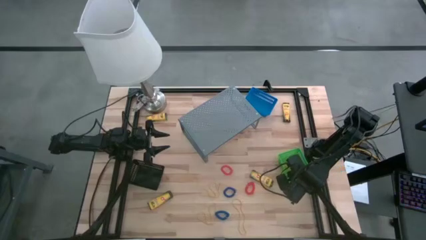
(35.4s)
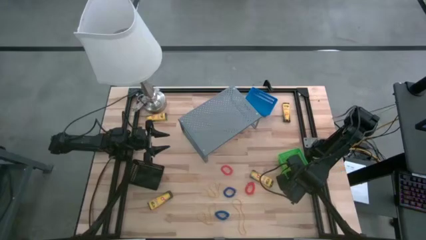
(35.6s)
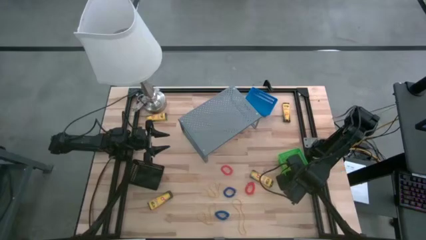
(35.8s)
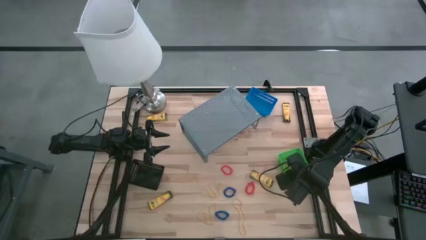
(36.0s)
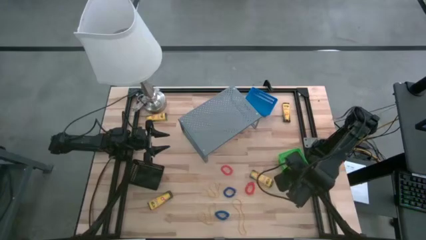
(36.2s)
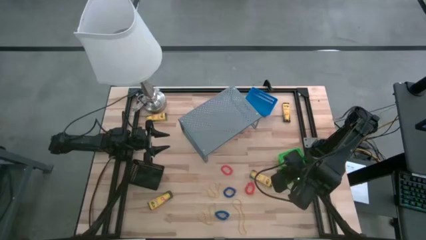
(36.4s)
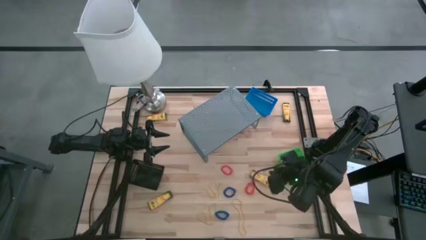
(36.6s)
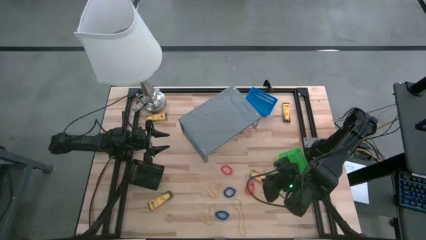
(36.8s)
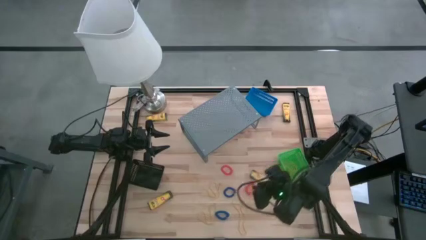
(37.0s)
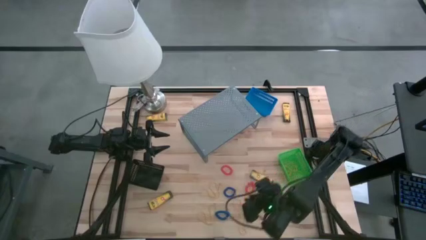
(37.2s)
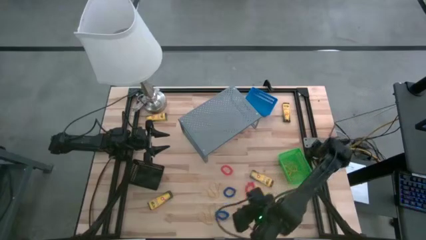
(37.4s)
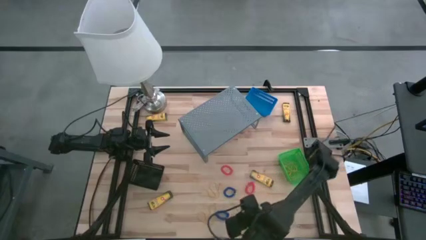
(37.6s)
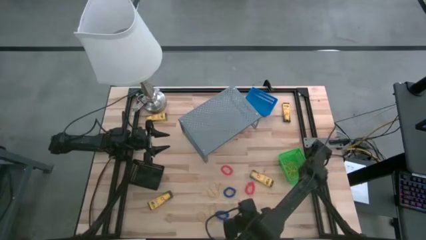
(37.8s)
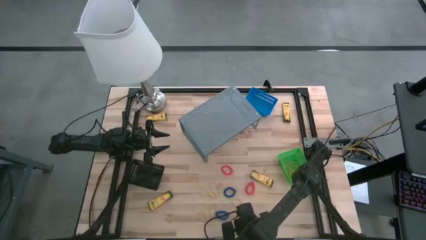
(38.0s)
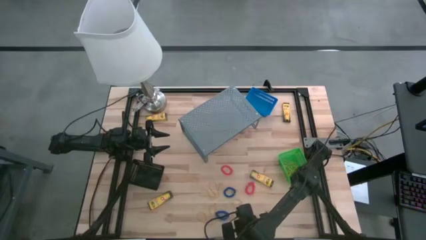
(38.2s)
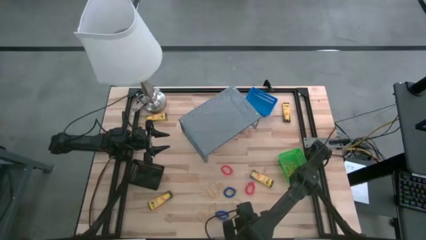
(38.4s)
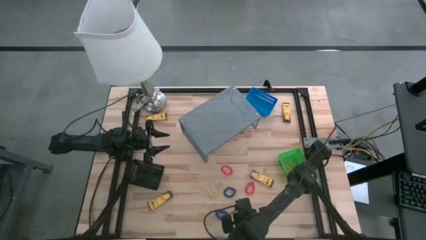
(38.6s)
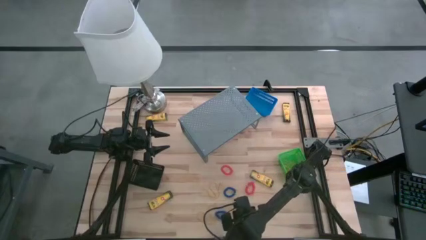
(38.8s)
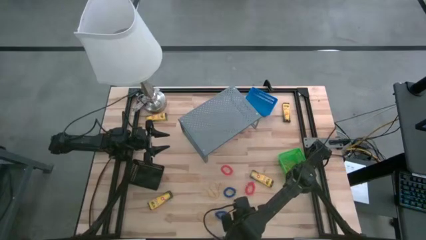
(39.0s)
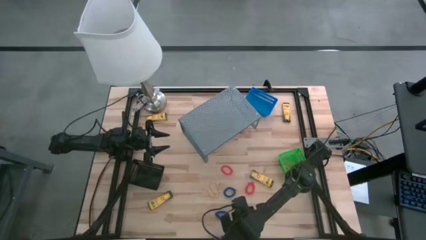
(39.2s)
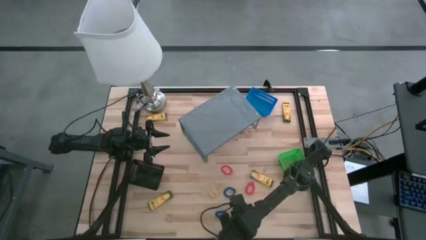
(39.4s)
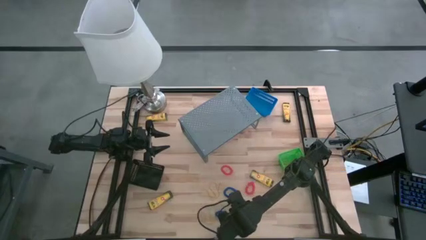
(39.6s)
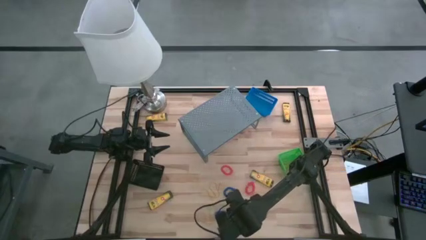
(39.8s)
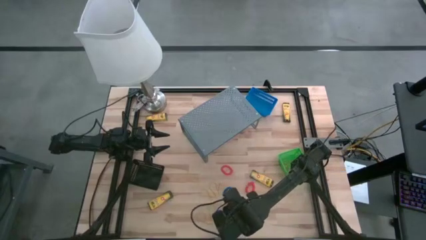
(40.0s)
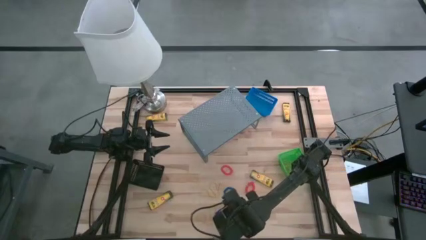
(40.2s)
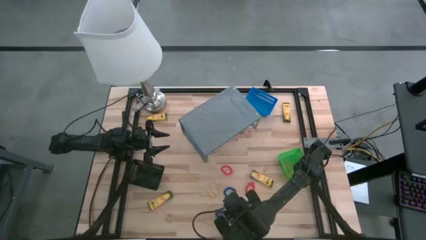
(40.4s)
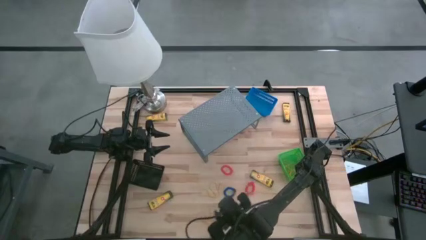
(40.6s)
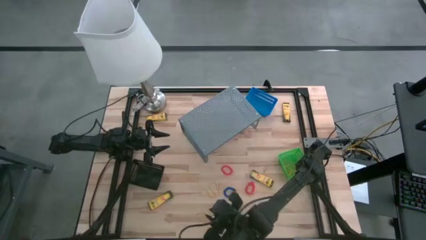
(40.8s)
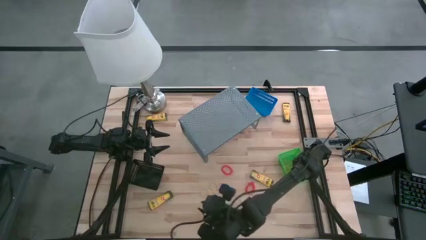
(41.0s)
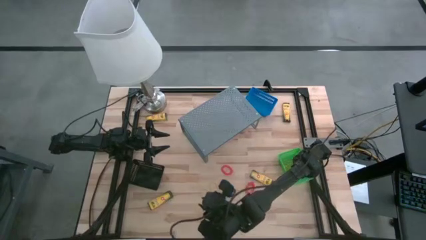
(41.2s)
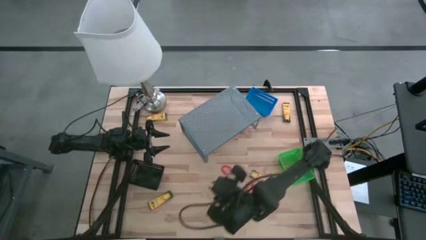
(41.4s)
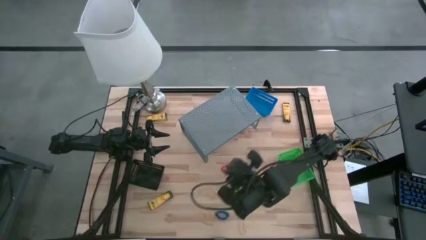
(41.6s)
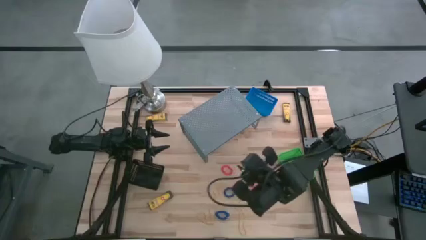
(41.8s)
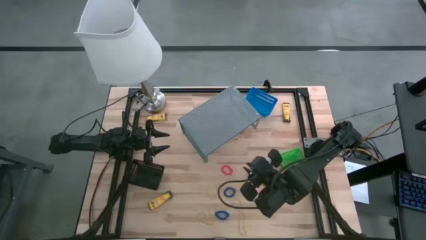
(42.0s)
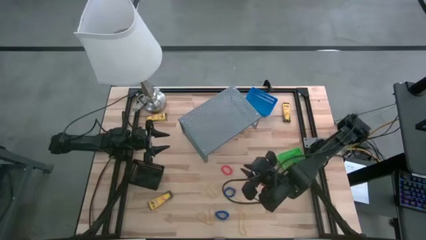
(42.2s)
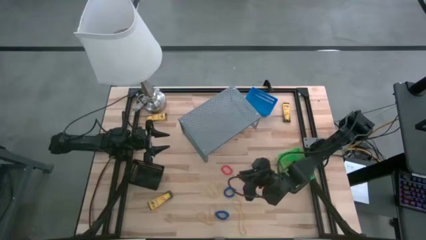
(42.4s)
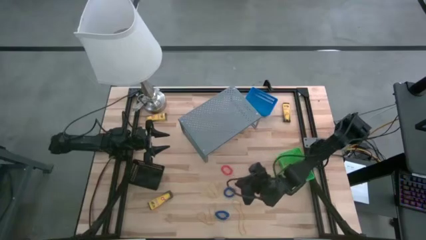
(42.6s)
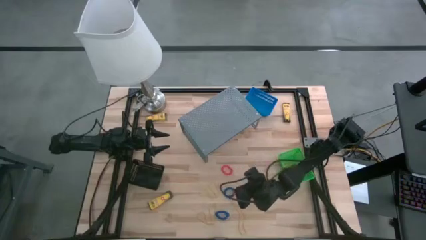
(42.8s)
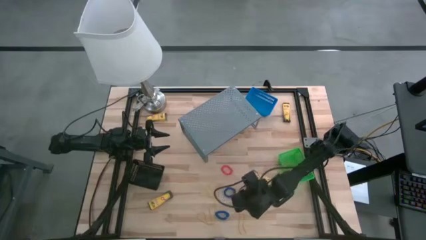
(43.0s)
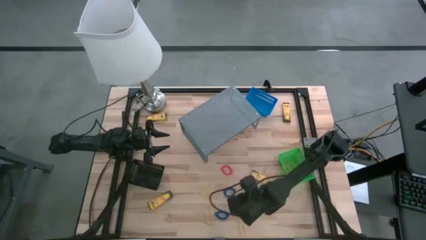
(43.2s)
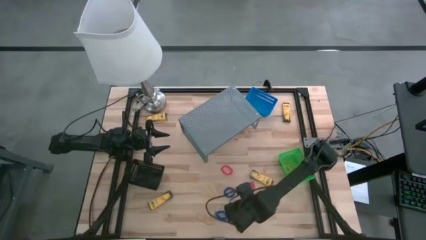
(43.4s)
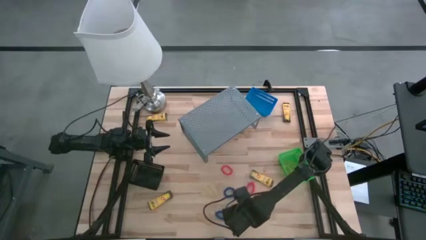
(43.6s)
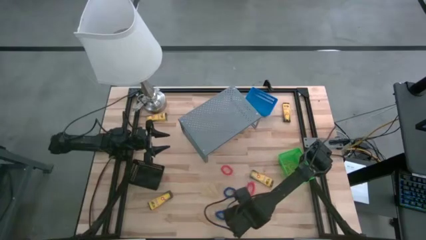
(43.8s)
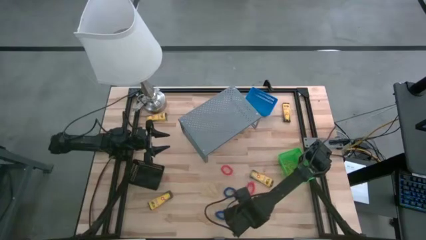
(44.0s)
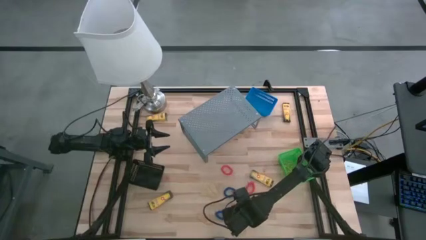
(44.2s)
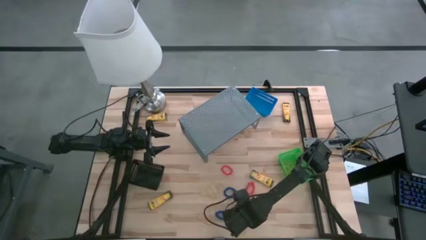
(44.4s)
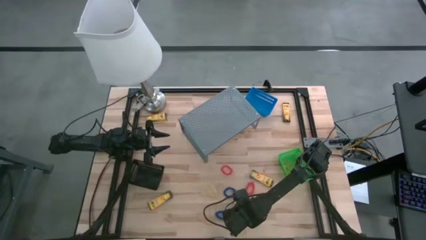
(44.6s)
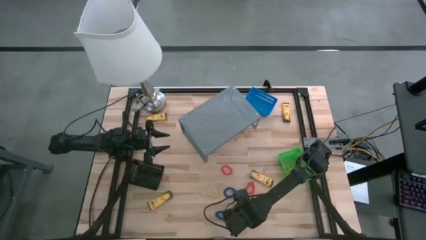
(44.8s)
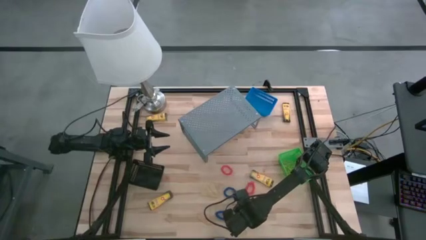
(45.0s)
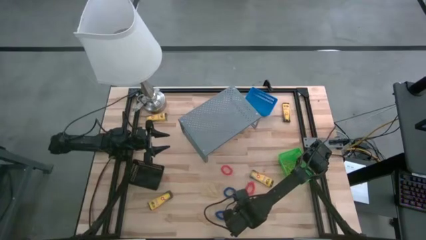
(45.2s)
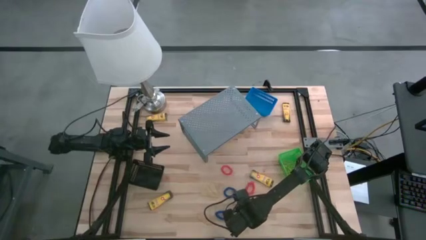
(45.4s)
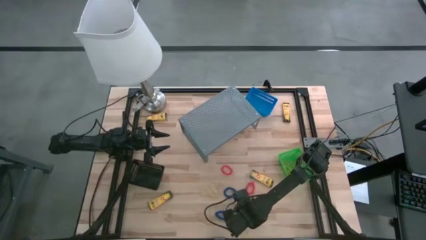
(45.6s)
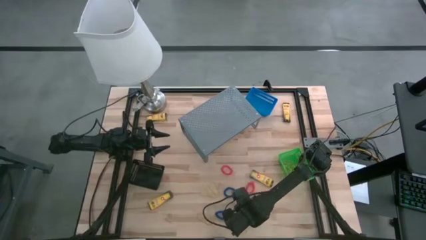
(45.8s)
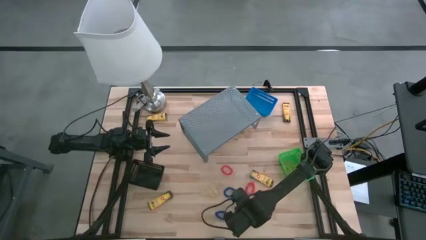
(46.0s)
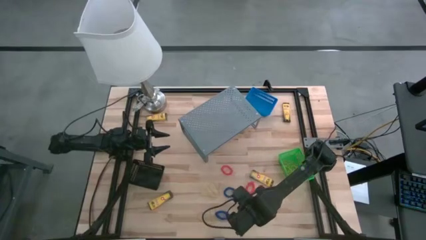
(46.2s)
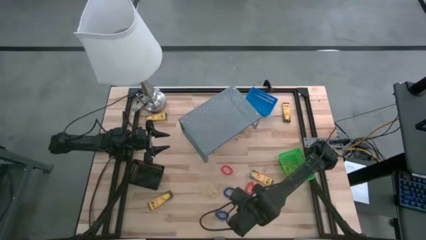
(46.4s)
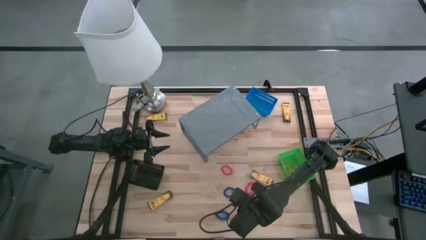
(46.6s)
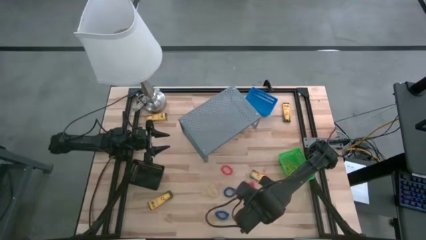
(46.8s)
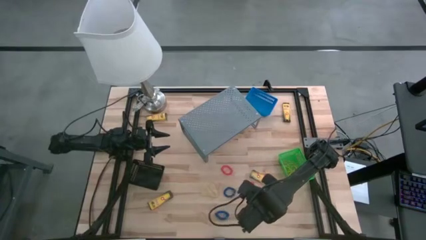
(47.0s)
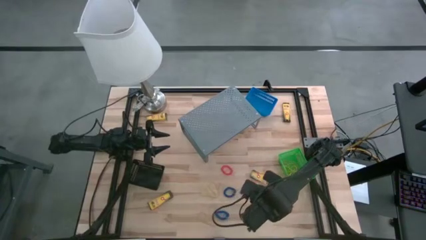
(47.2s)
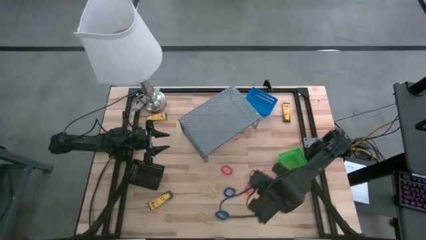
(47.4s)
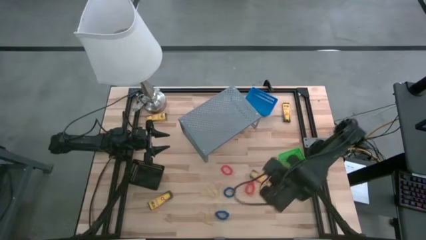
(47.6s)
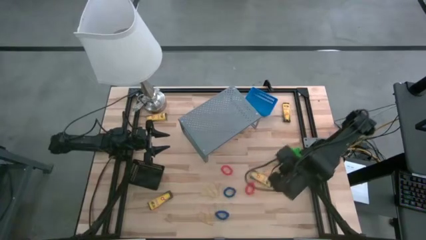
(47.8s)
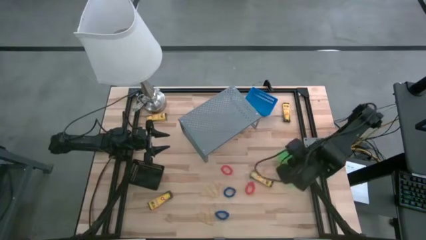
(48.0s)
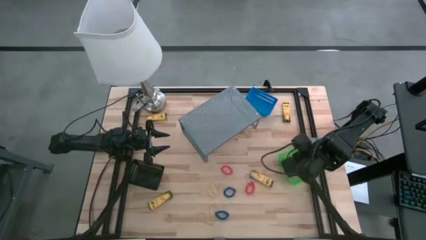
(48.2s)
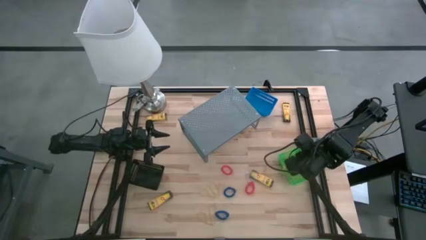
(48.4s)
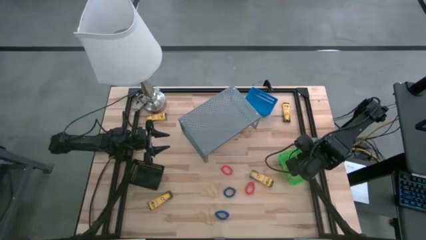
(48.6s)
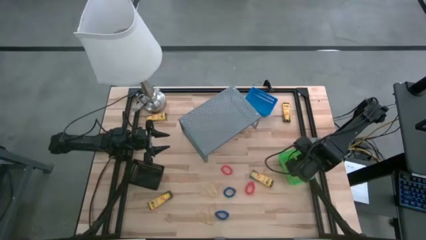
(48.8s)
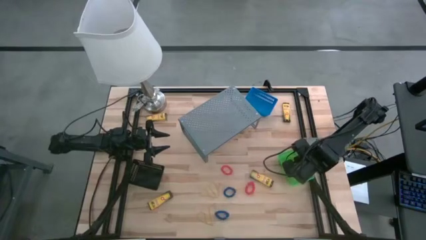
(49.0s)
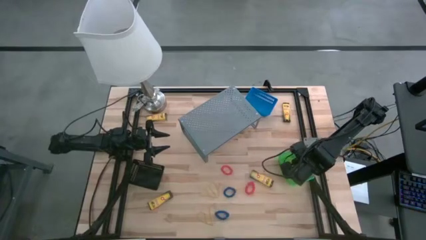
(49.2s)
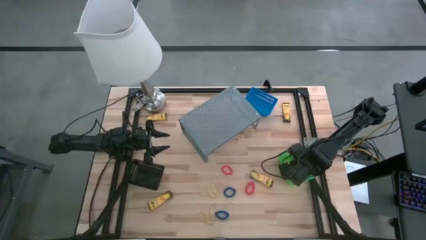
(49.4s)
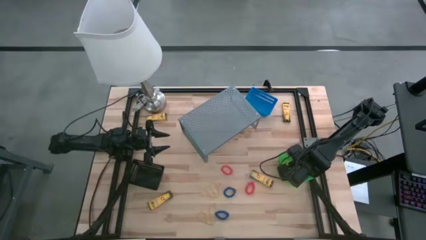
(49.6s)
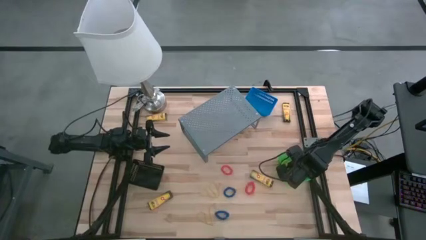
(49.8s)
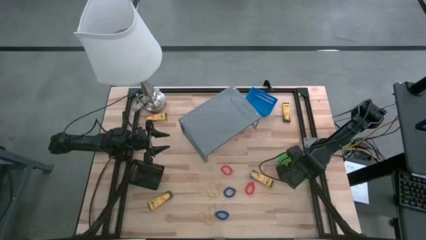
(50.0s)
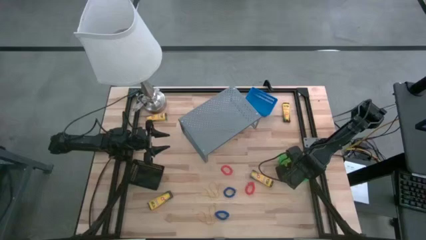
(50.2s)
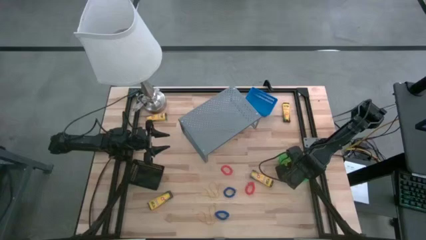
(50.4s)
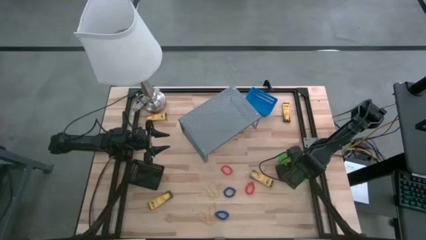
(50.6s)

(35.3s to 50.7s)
Task: Pick & Place Office Desk Supplies
Put the yellow rubber band into the green basket
